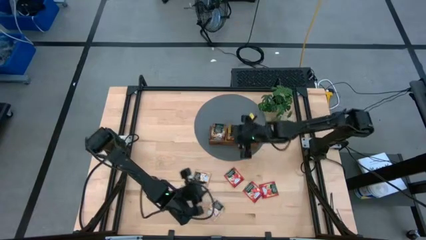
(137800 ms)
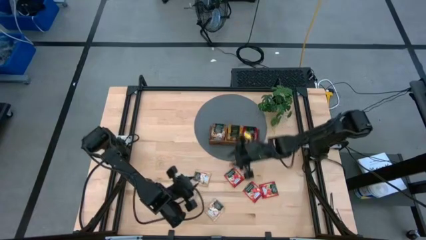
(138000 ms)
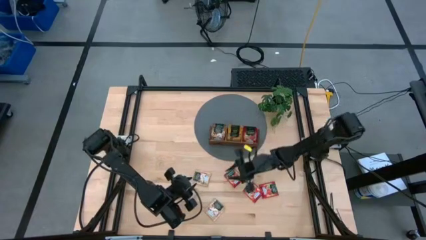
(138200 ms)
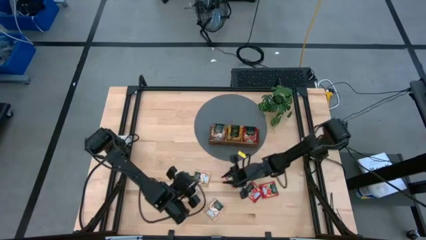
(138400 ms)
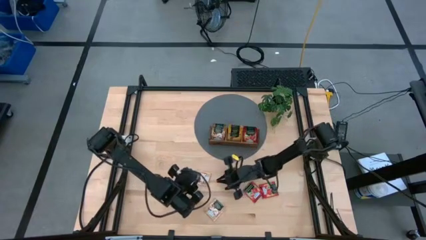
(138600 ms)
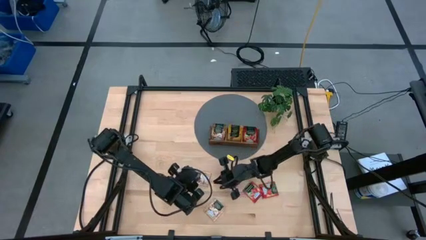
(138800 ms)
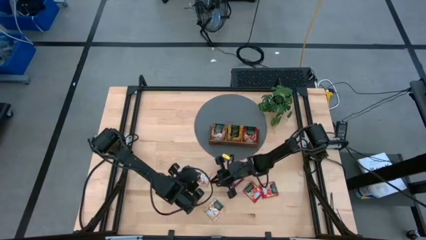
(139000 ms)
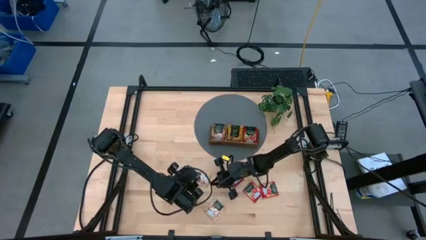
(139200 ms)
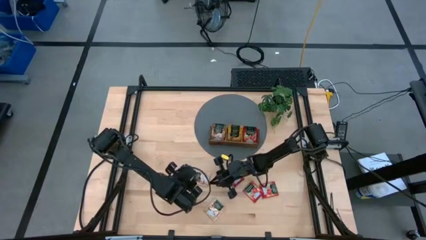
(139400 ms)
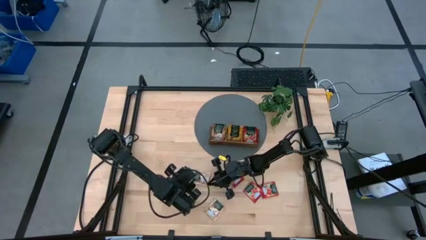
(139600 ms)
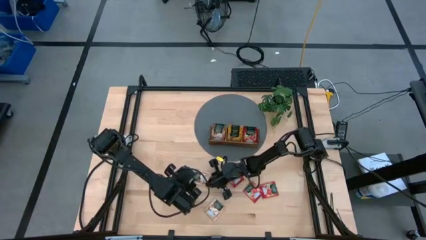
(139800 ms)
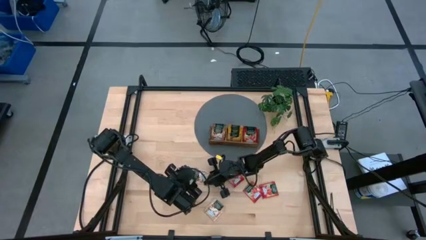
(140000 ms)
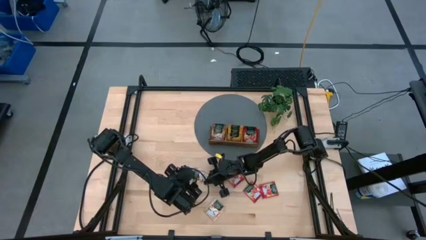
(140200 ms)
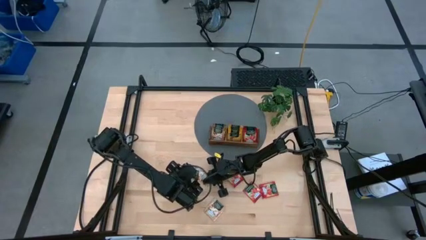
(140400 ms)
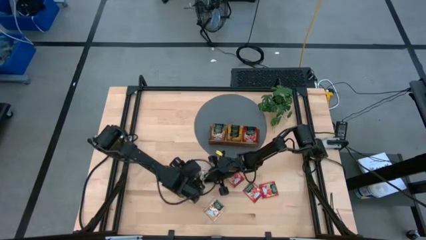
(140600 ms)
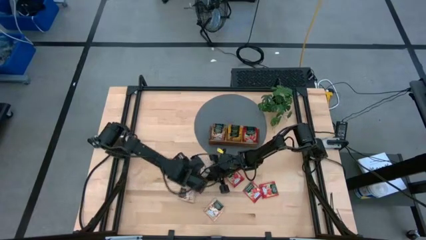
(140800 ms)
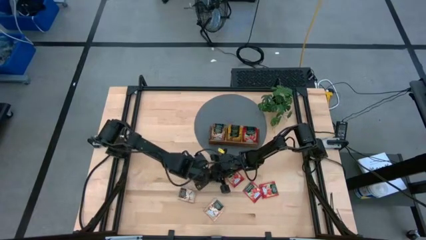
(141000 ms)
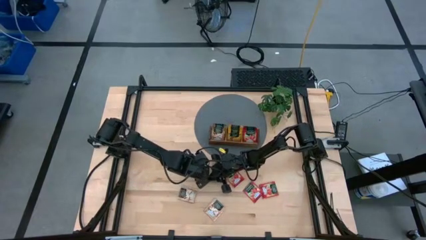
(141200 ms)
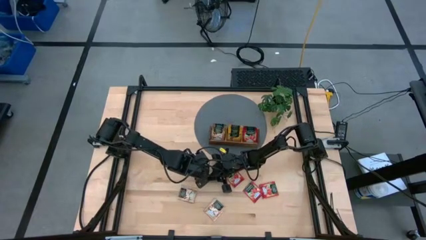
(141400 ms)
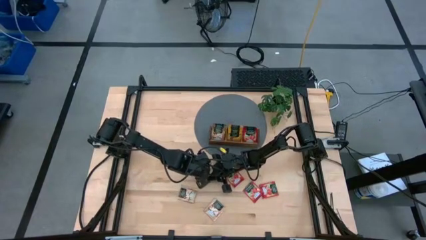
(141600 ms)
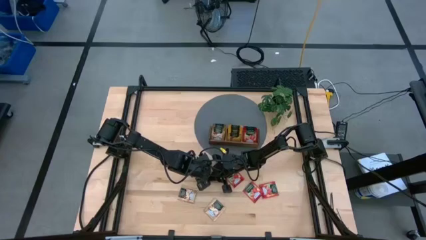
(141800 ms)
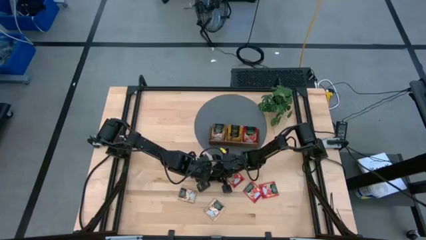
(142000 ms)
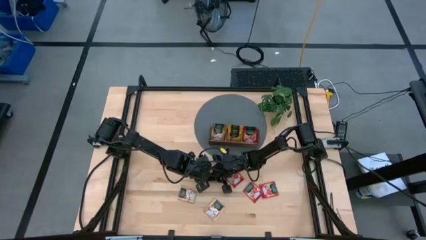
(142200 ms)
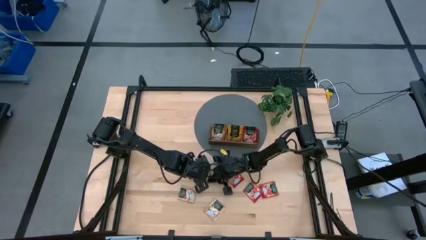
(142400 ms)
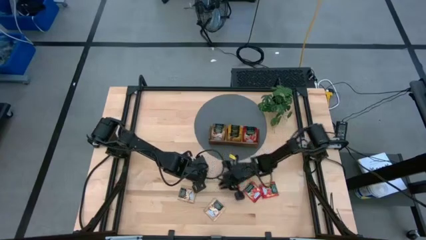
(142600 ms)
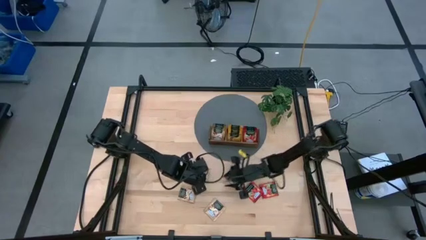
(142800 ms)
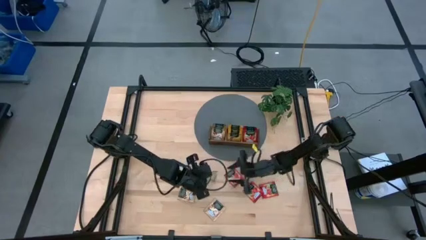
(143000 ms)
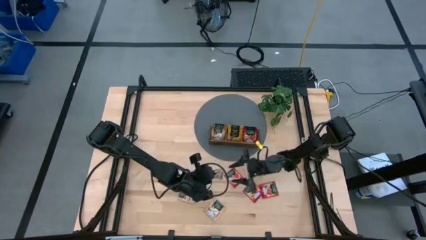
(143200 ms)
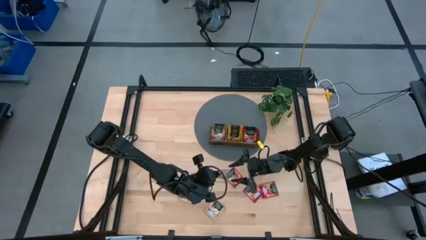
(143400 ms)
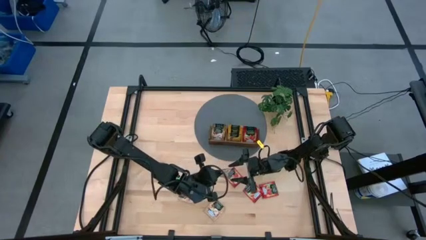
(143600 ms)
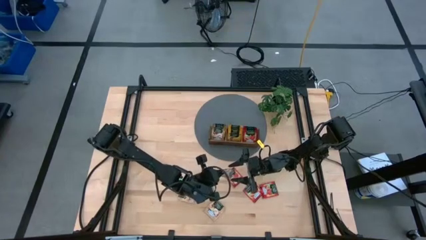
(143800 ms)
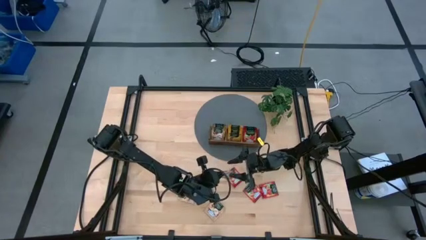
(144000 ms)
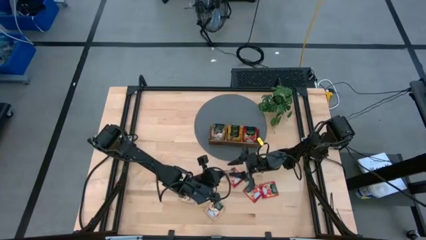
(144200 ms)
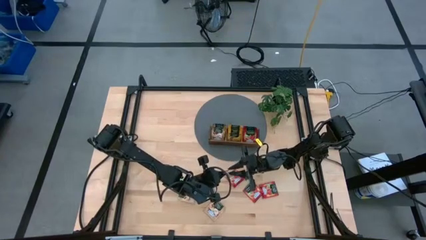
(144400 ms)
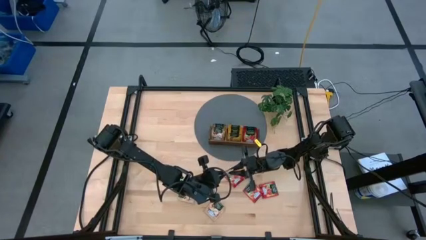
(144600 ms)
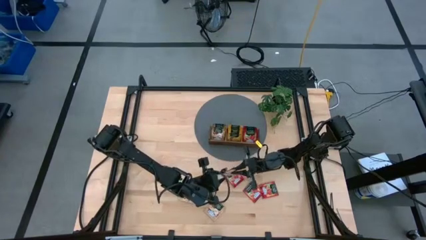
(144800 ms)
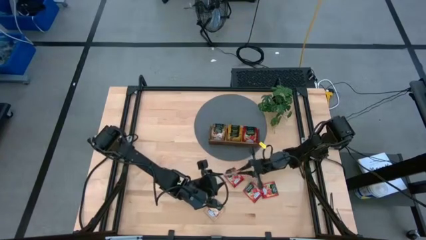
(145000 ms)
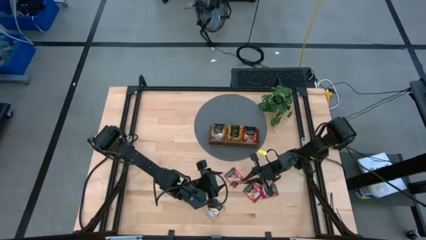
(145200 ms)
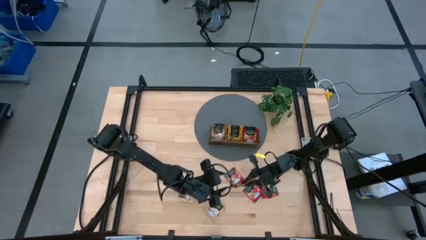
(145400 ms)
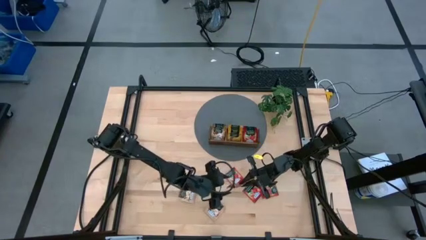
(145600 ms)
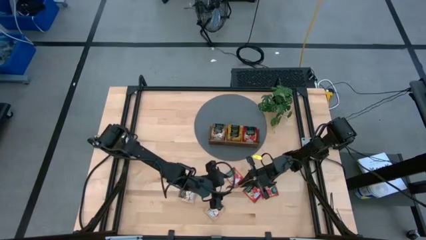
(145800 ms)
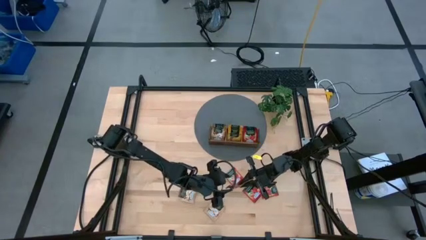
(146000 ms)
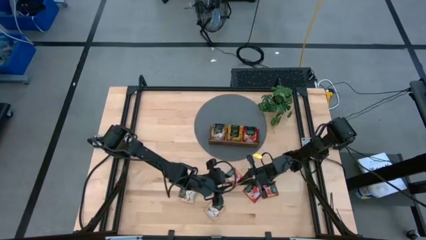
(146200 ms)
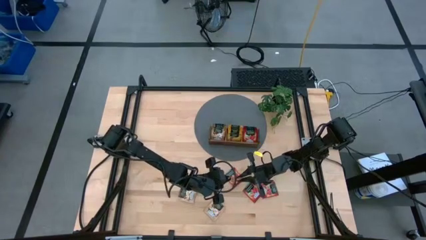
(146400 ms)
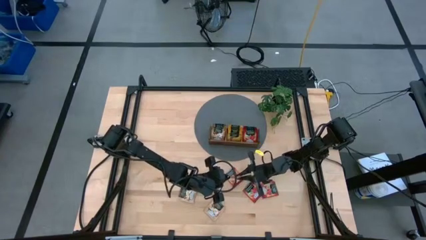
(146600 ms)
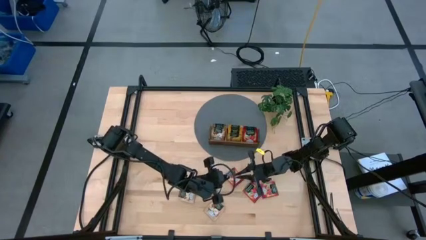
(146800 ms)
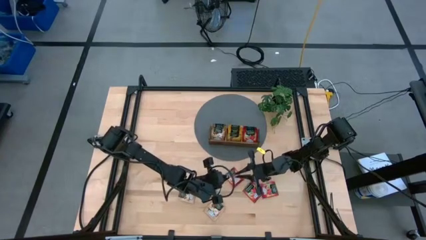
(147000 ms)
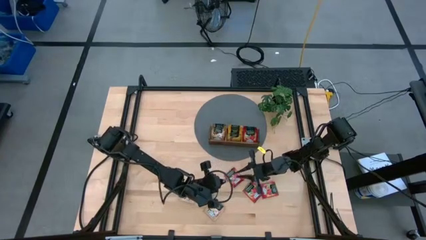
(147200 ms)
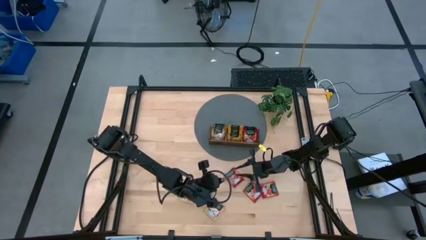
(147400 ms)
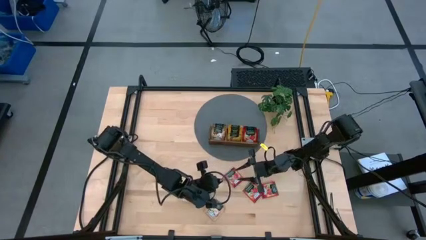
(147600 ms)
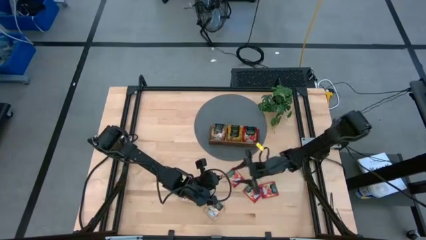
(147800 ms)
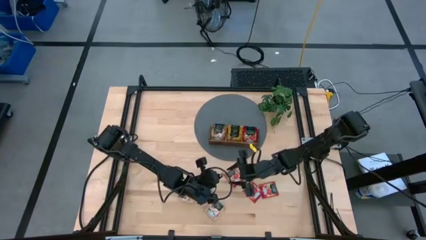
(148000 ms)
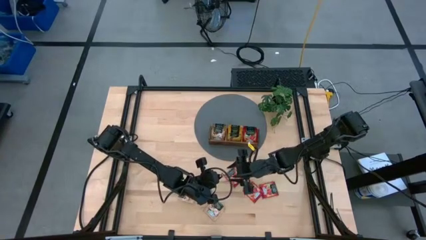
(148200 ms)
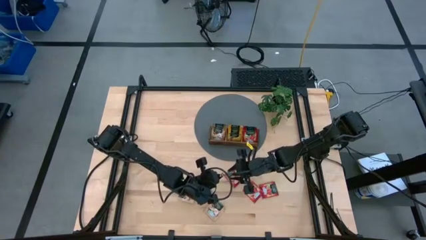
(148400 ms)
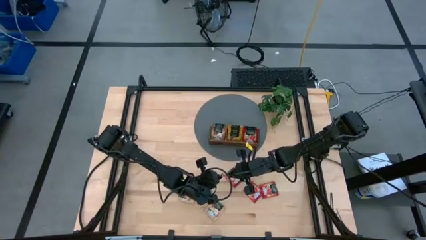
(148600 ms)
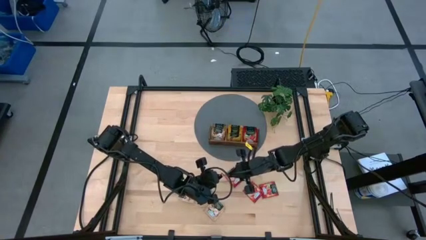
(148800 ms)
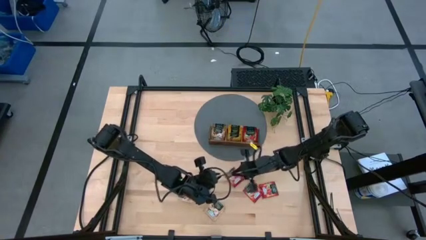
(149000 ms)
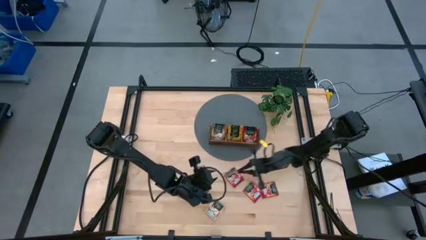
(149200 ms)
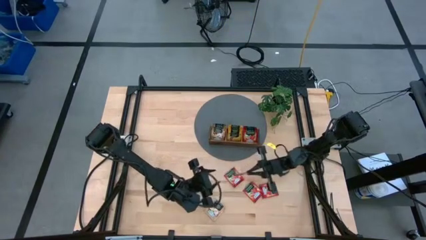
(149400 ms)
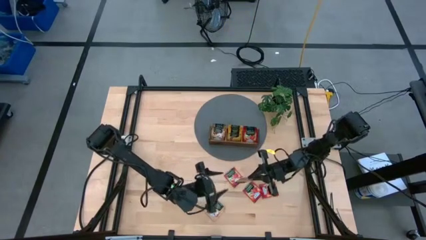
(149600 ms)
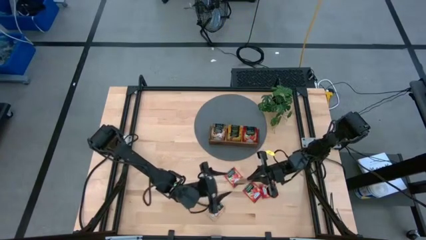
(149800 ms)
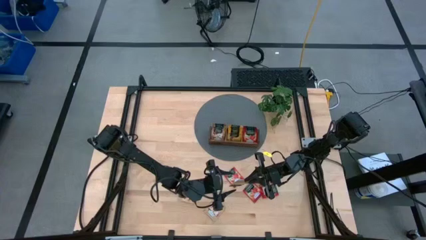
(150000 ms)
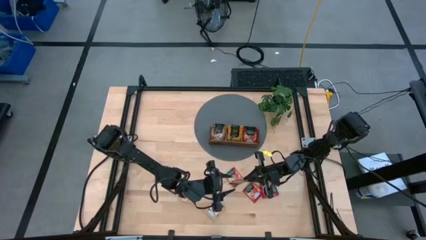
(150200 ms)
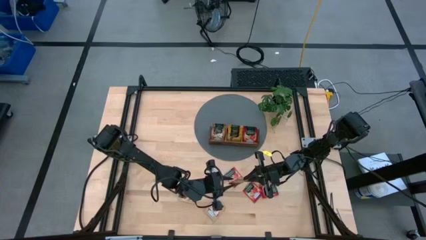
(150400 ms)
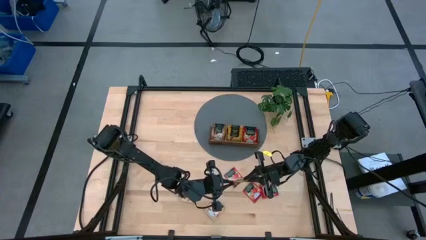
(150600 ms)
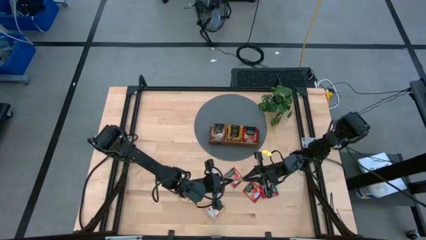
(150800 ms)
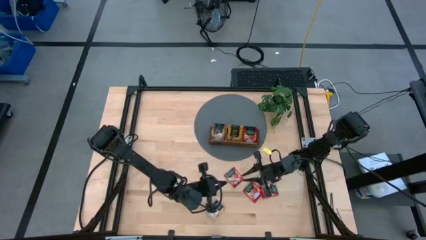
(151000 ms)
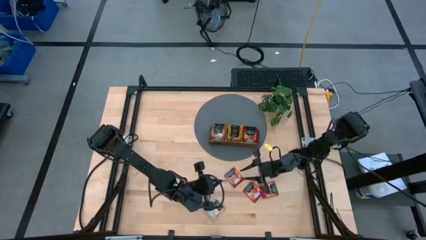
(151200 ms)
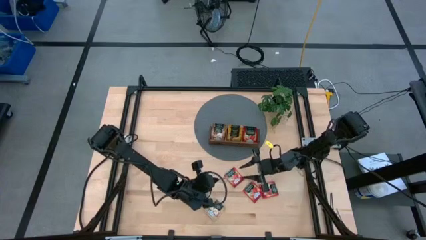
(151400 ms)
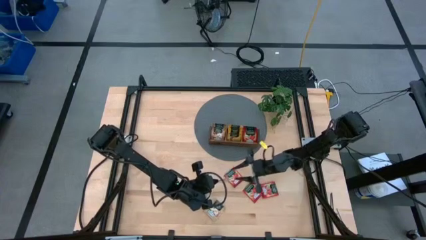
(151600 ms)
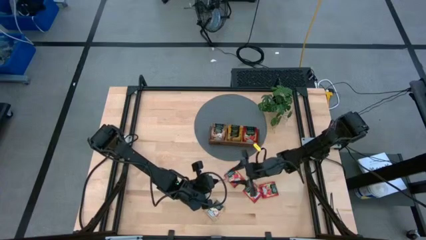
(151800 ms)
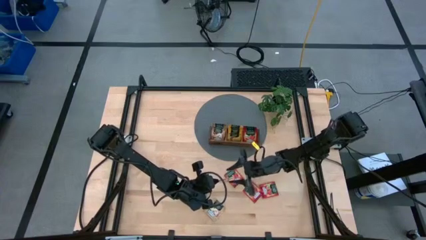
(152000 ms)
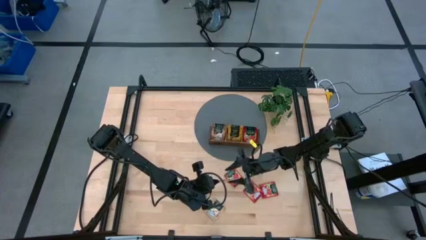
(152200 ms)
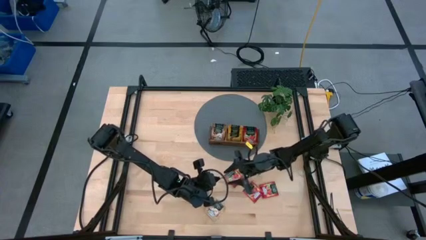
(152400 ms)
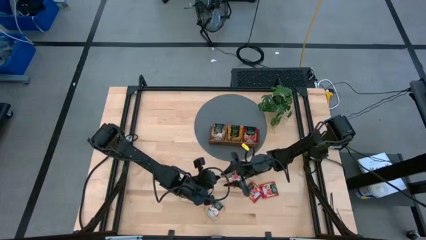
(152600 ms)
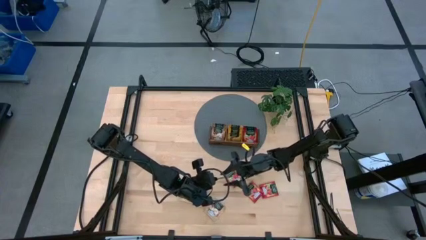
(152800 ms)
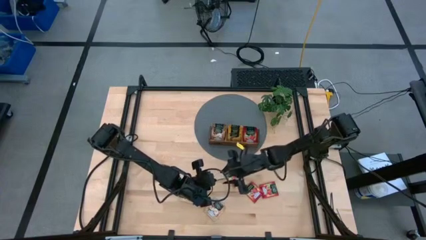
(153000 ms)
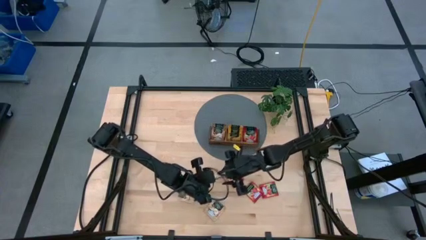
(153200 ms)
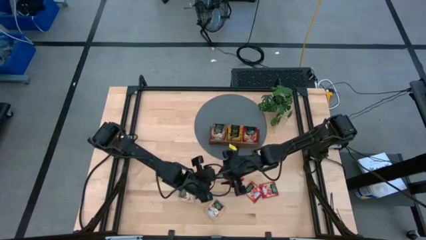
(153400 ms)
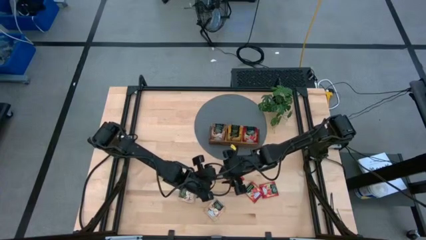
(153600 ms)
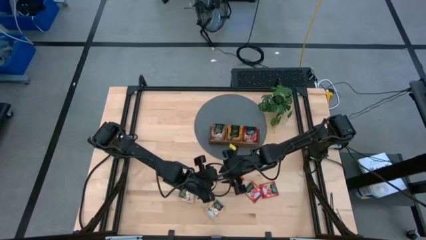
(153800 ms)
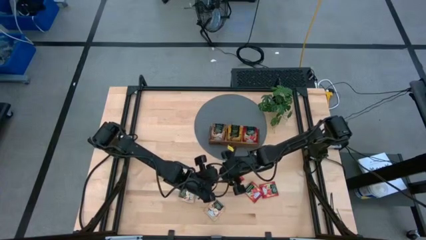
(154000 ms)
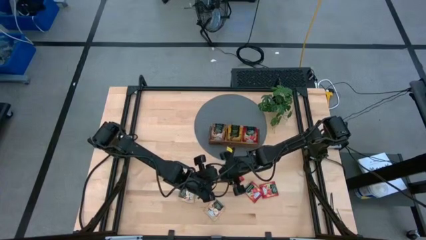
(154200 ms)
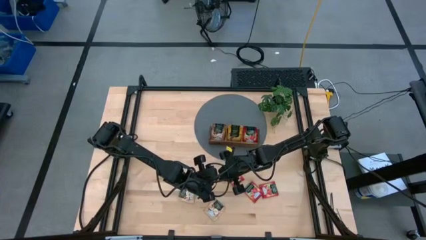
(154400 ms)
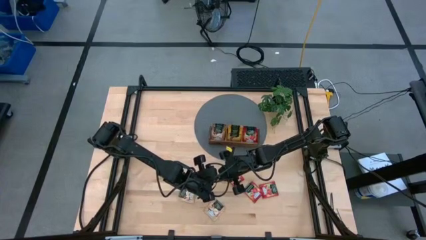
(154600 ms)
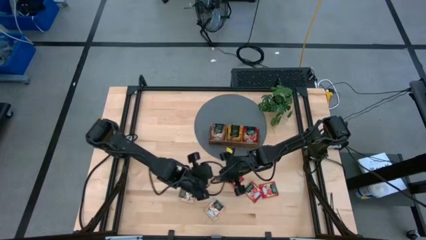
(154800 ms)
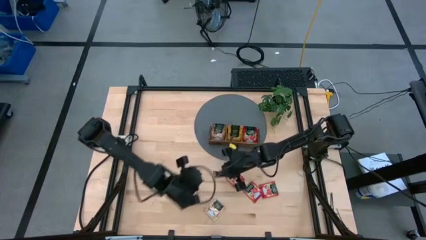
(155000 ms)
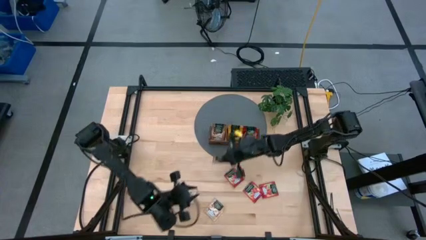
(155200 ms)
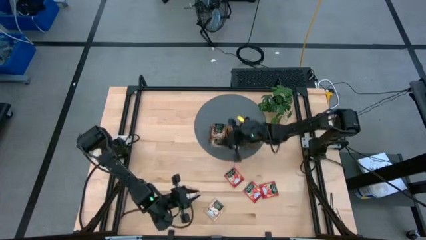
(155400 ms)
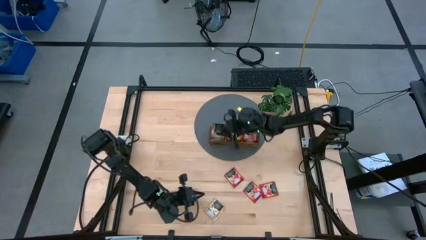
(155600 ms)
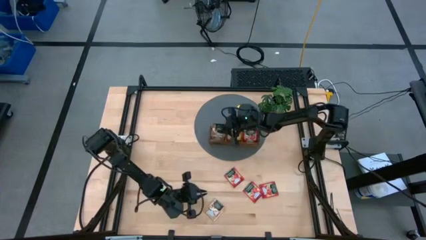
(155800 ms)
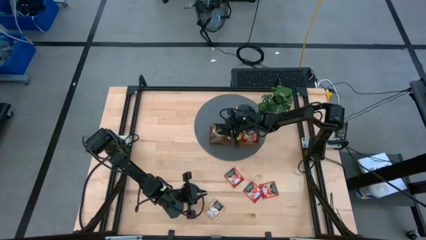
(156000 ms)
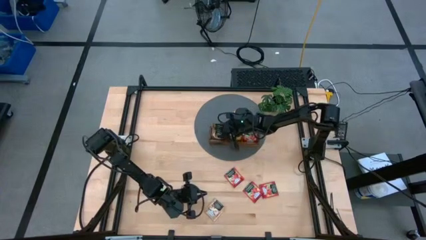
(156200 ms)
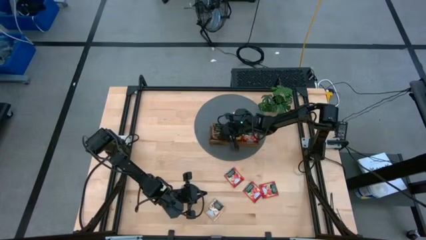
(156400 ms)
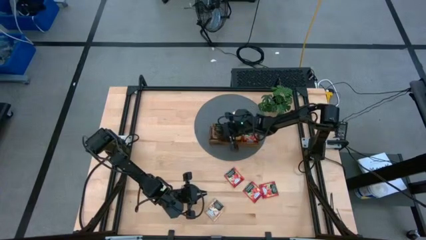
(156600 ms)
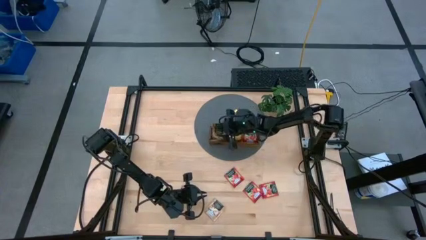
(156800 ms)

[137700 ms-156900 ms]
Task: Pick & Place Tea
Put the brown tea bag into the left section of the wooden organizer
